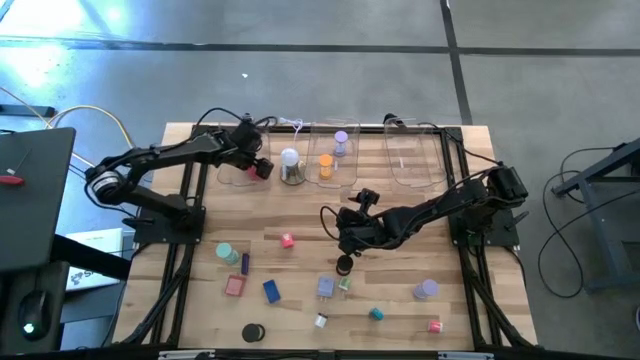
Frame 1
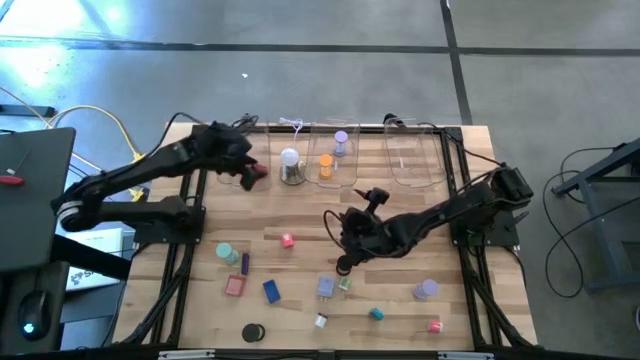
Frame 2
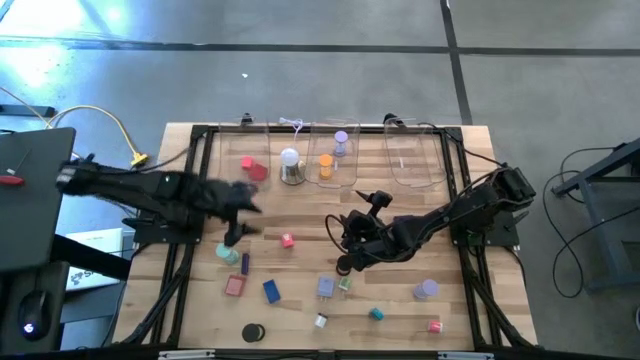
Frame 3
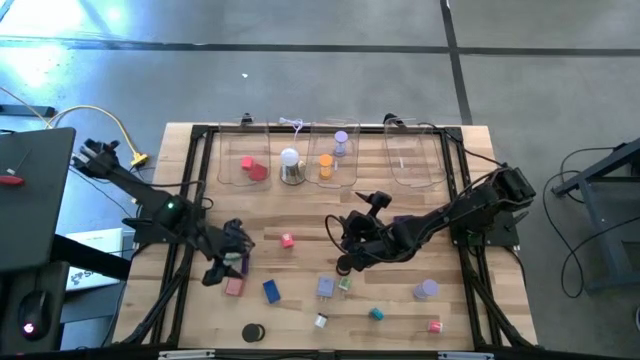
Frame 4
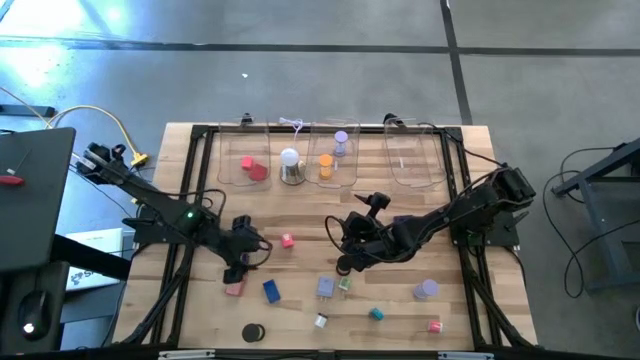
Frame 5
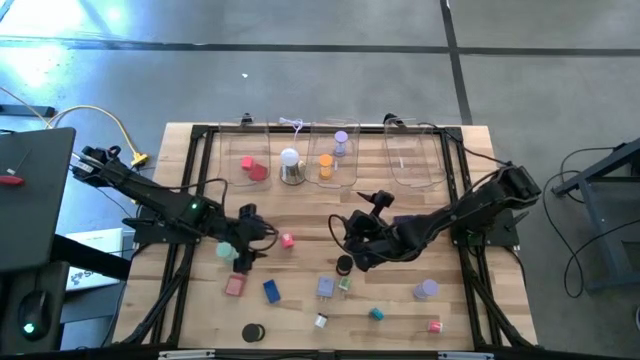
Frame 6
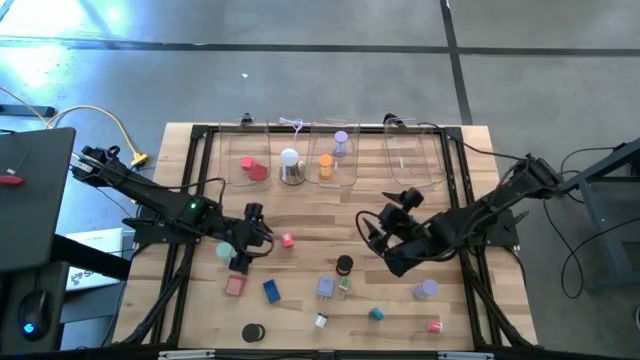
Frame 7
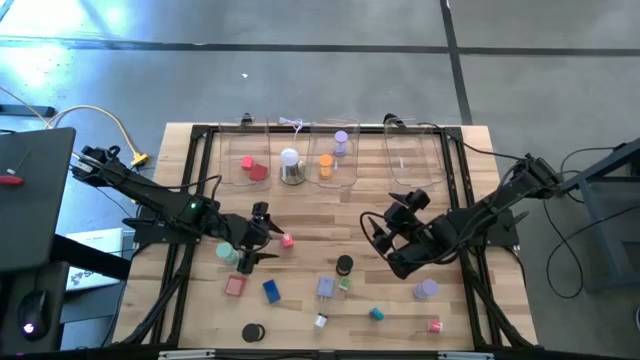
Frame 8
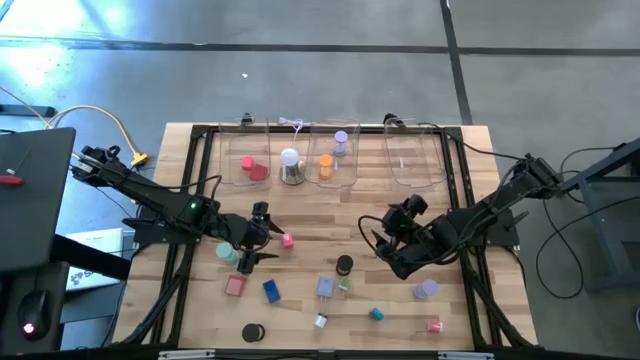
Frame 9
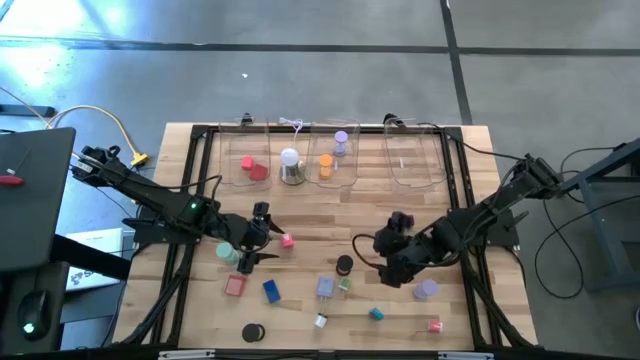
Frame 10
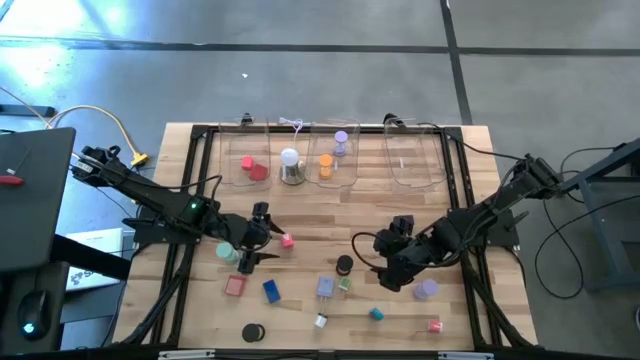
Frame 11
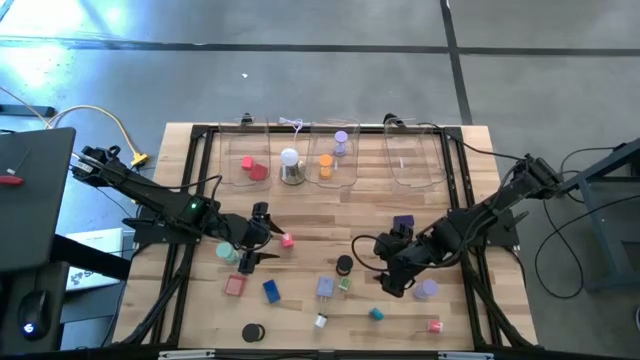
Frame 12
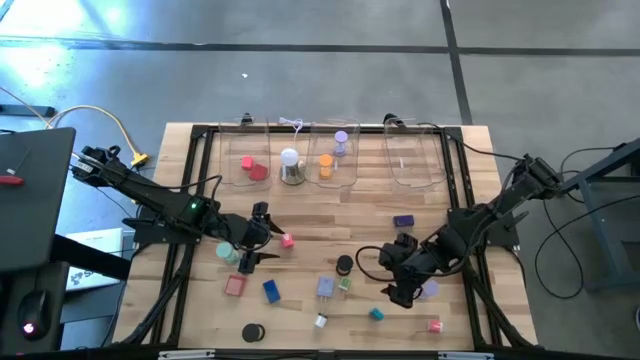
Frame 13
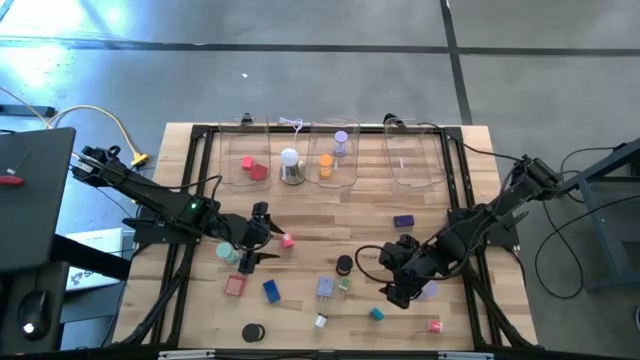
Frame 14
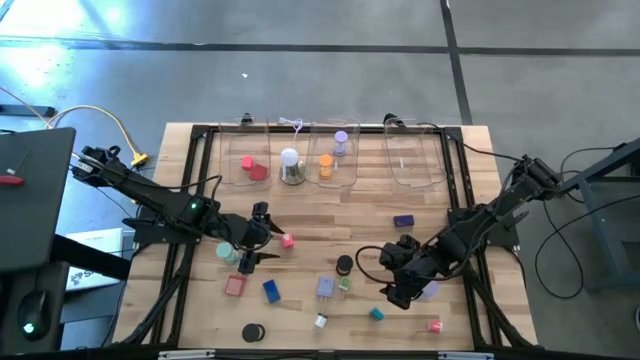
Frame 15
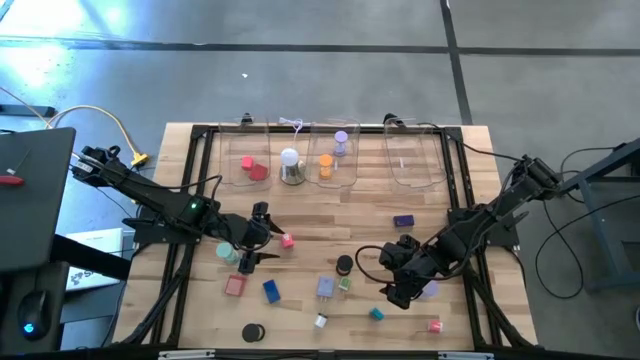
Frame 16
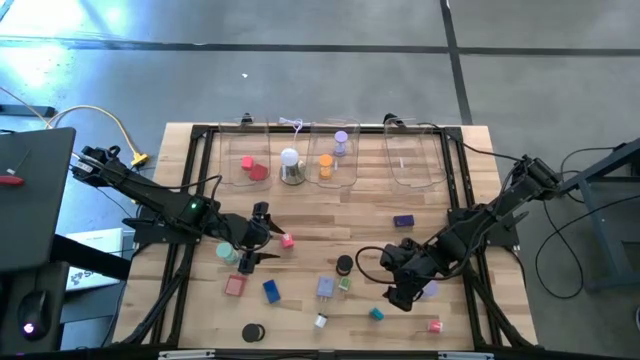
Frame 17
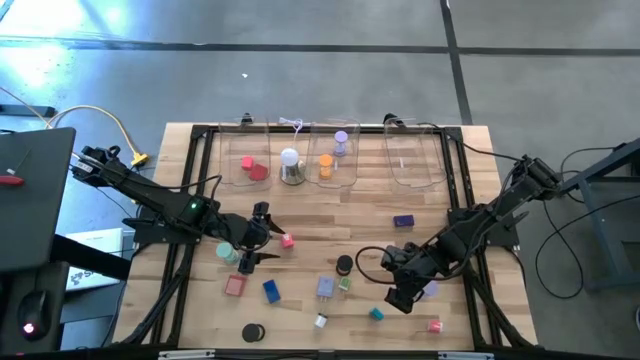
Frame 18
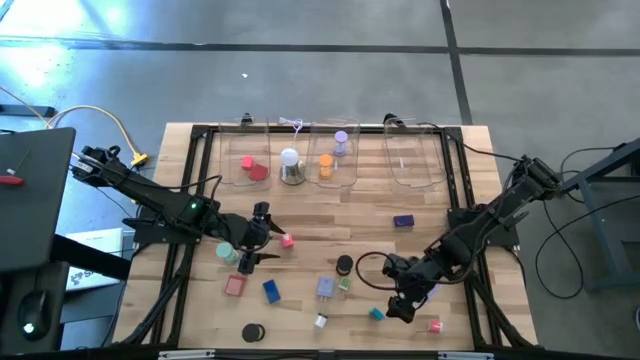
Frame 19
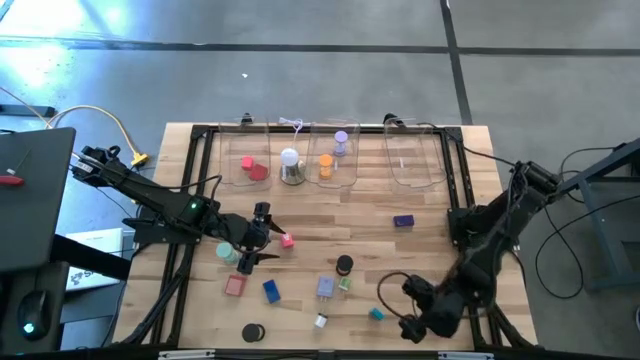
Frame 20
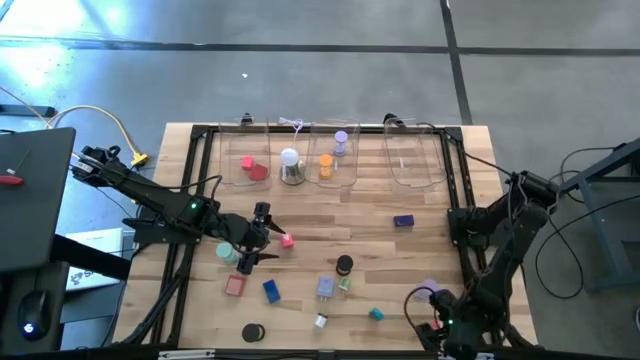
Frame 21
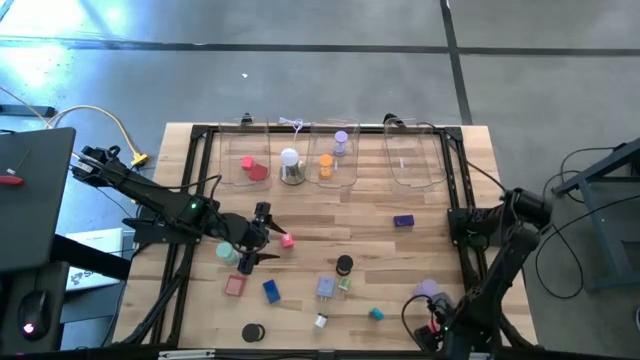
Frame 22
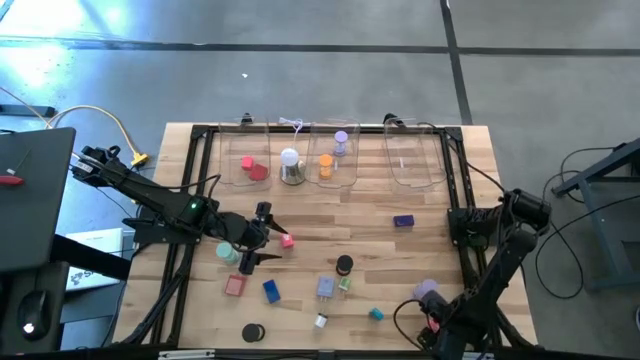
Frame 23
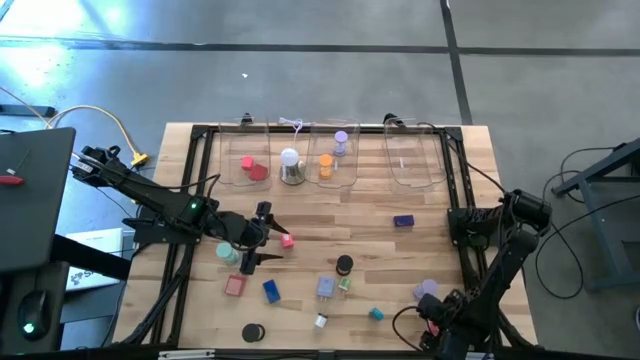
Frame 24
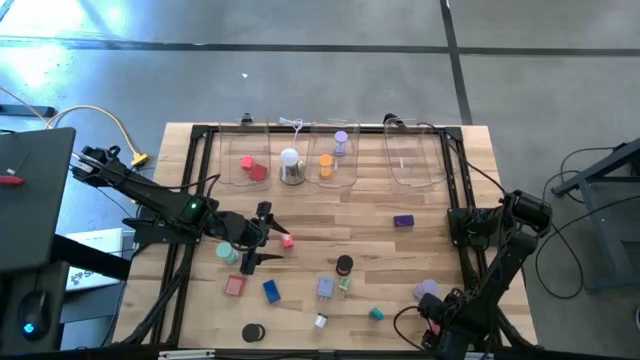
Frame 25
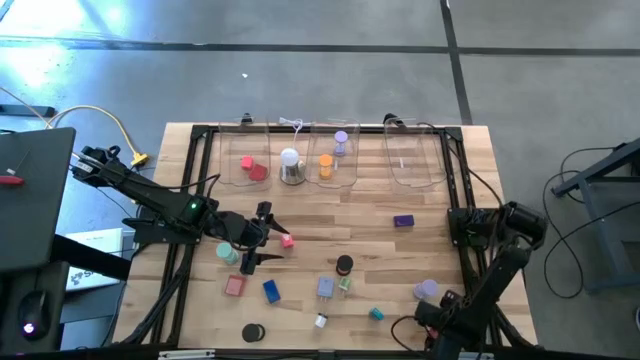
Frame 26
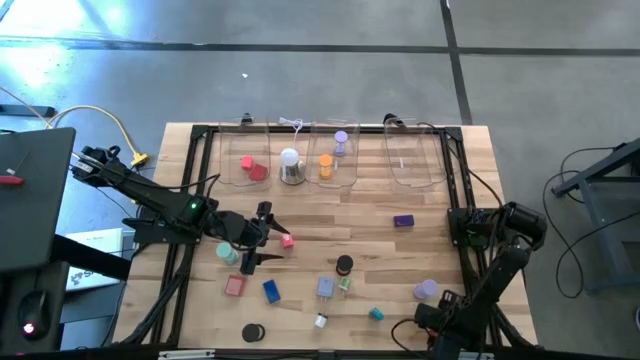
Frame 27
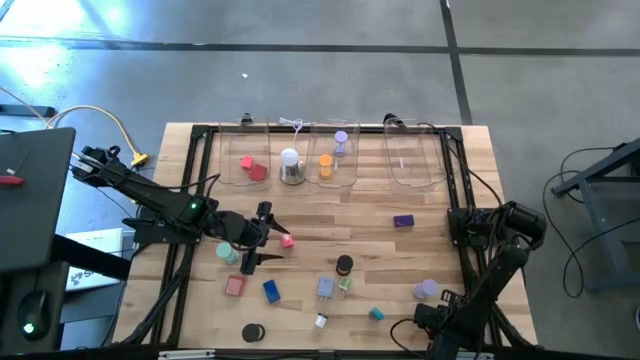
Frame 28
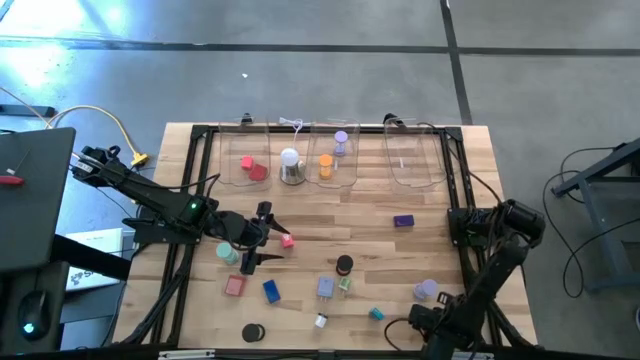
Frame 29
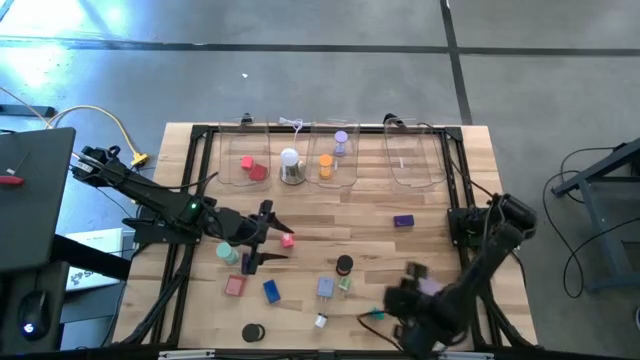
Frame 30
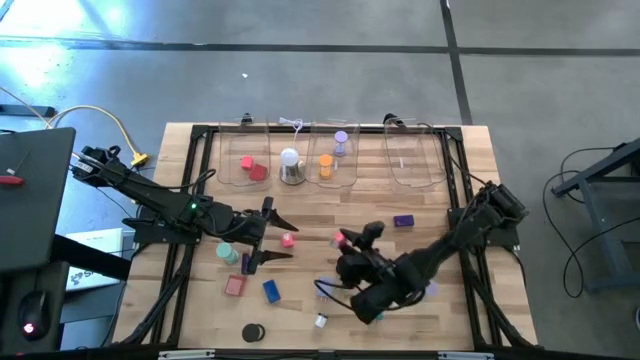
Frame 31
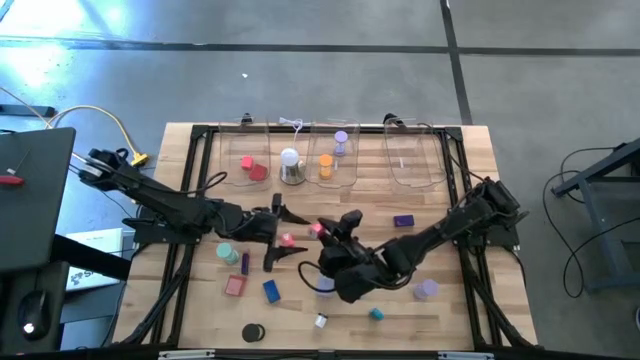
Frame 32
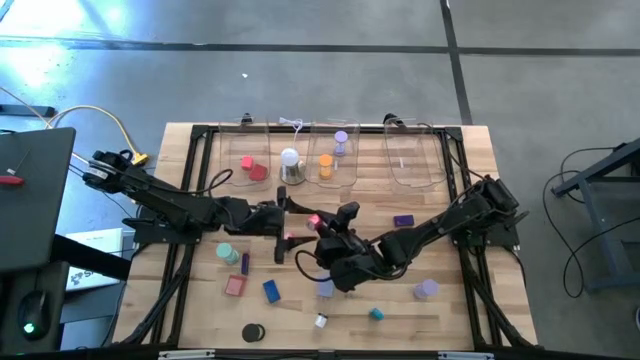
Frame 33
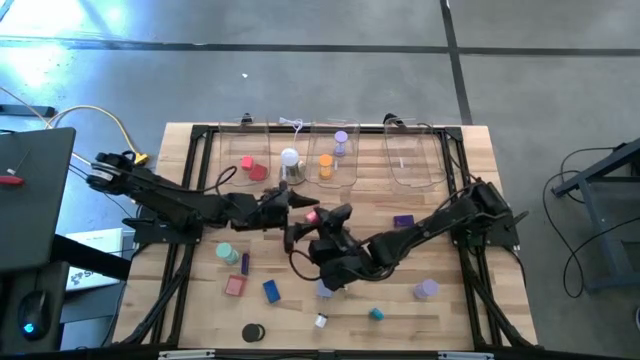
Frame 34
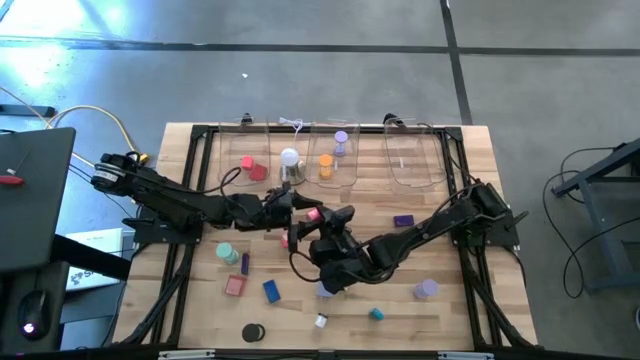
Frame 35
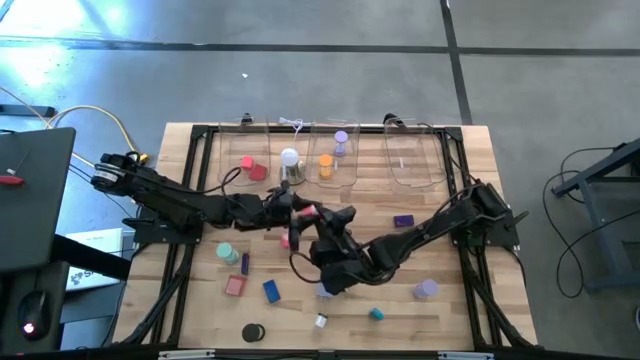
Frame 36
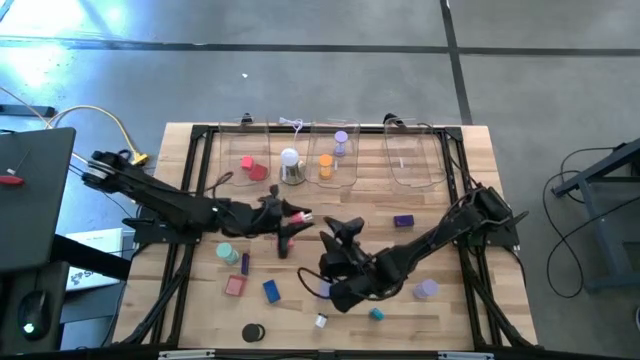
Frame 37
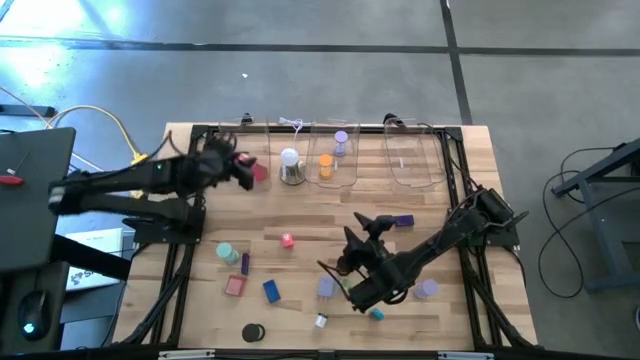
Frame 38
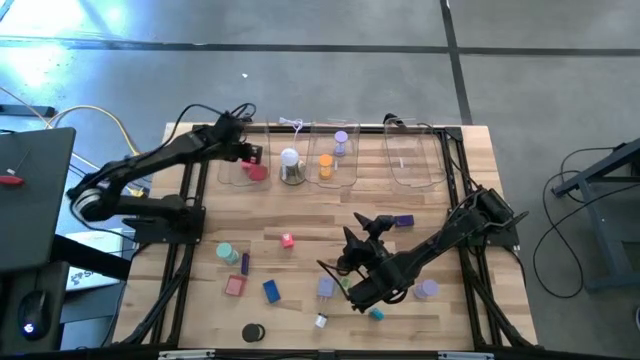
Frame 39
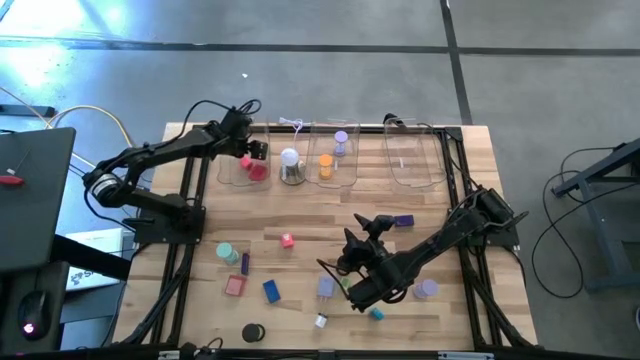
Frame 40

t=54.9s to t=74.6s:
Task: Pick & Place Office items
Put the pink and white charger adapter into the left transparent bin

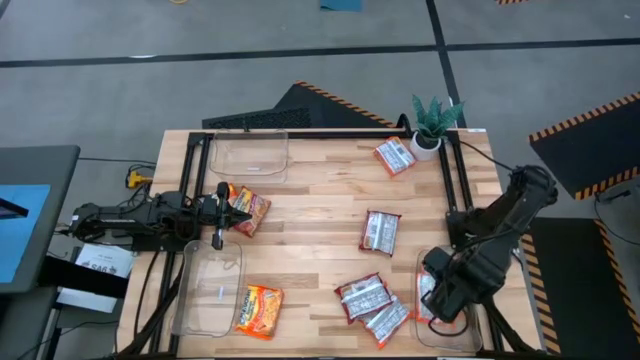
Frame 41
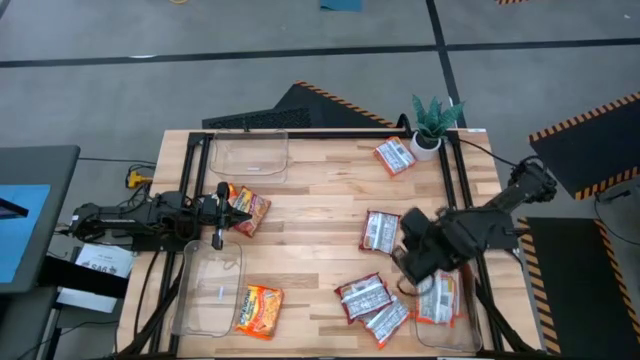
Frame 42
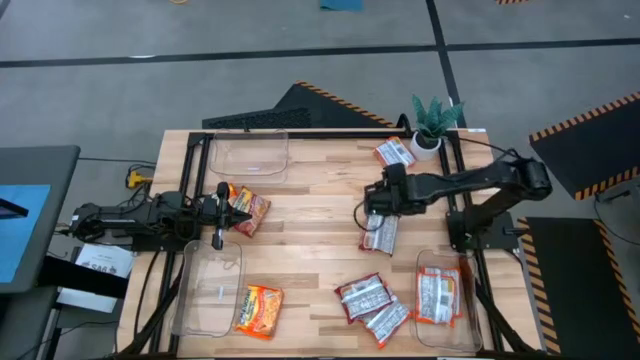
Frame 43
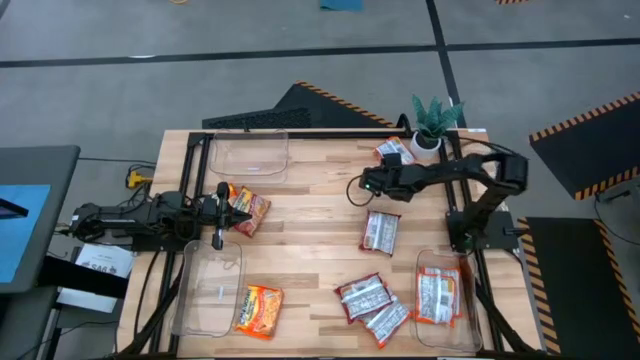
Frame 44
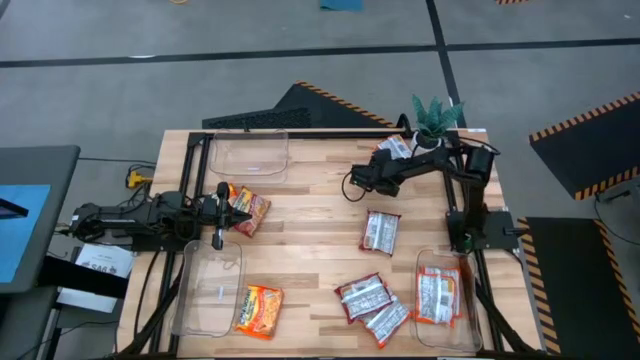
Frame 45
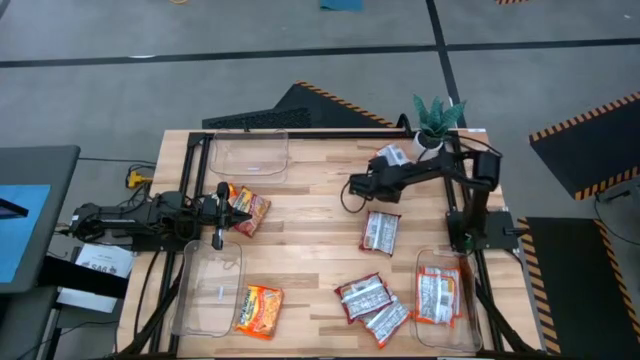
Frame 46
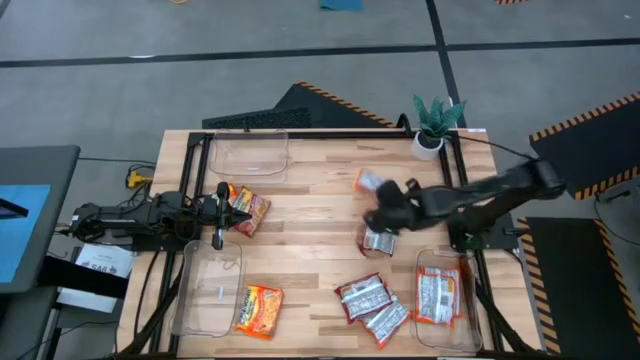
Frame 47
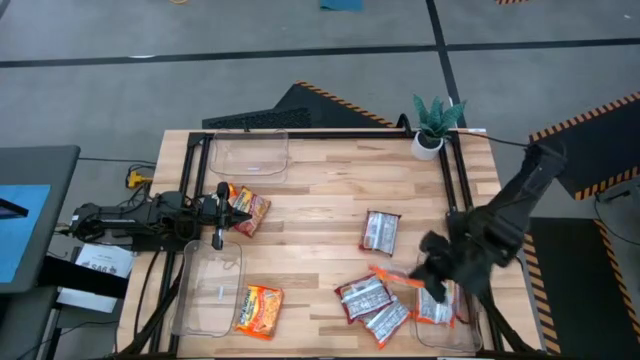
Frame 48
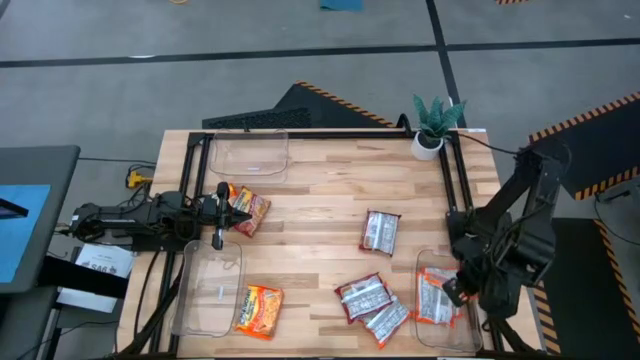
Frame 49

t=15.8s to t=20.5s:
Task: Sort Maruchan noodles
Put the orange noodle pack into the bottom right transparent bin
